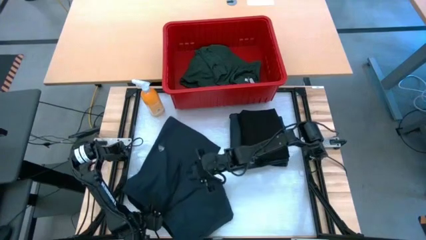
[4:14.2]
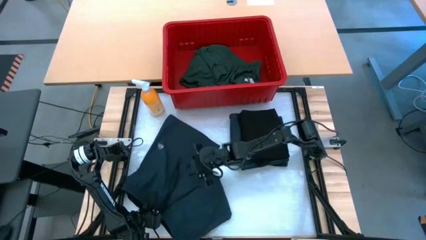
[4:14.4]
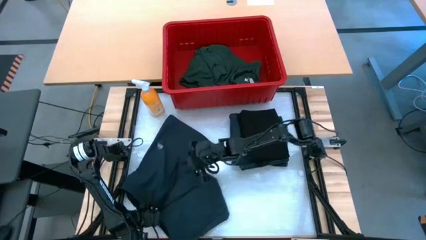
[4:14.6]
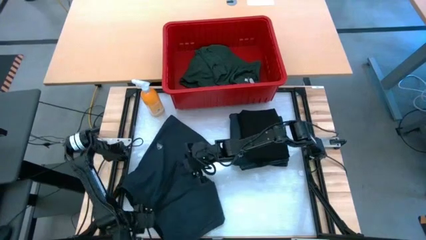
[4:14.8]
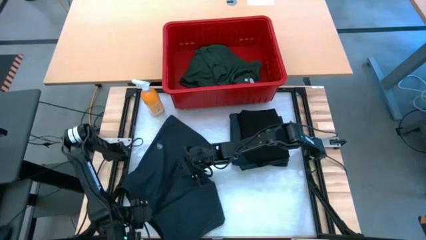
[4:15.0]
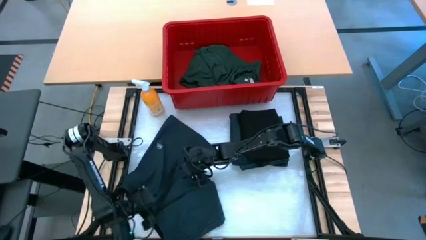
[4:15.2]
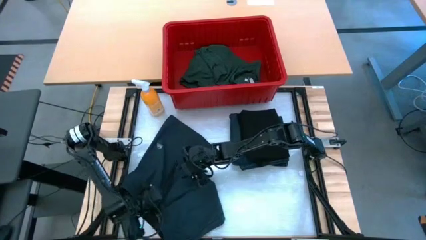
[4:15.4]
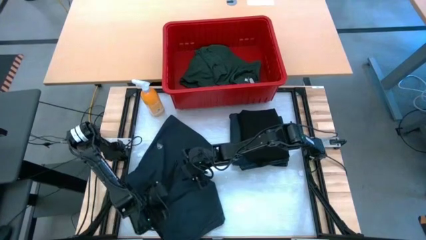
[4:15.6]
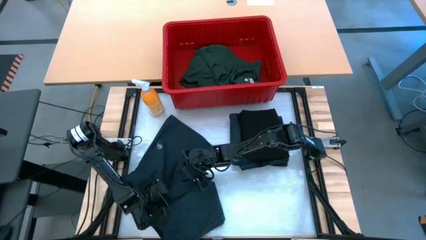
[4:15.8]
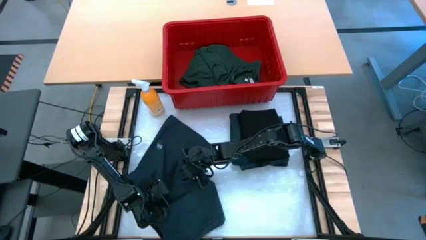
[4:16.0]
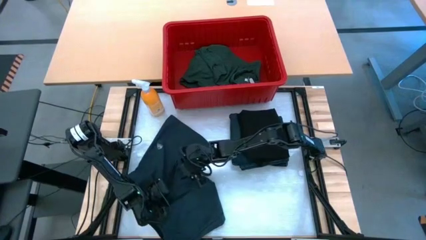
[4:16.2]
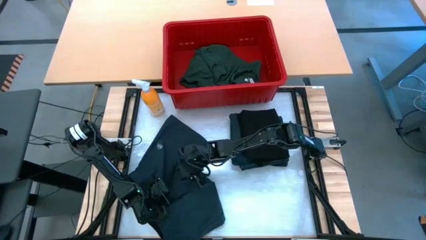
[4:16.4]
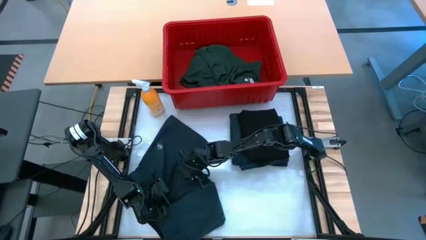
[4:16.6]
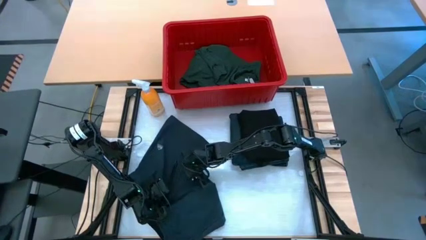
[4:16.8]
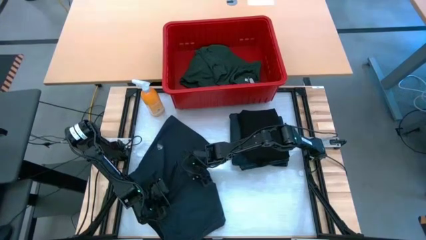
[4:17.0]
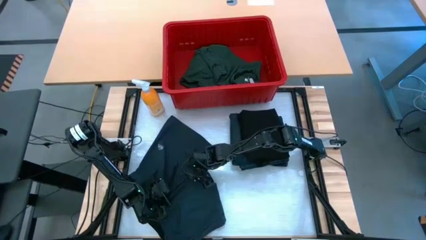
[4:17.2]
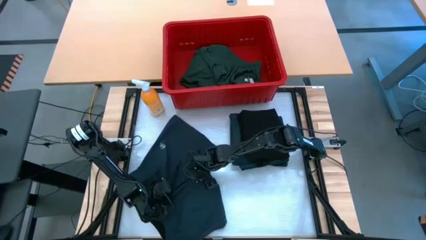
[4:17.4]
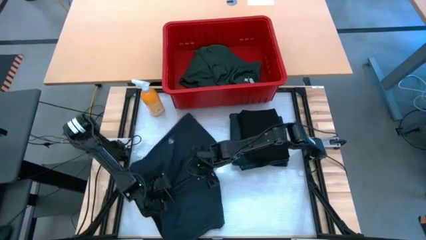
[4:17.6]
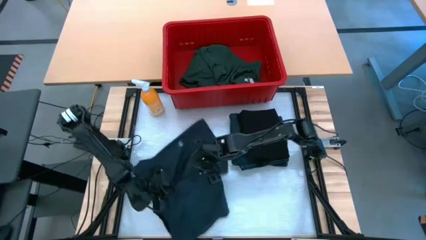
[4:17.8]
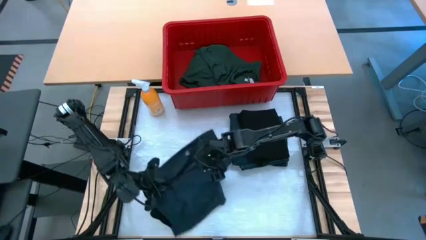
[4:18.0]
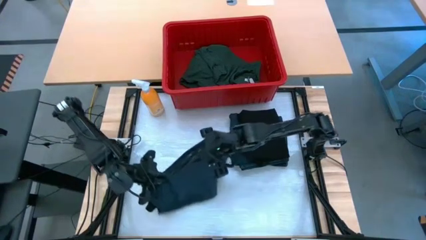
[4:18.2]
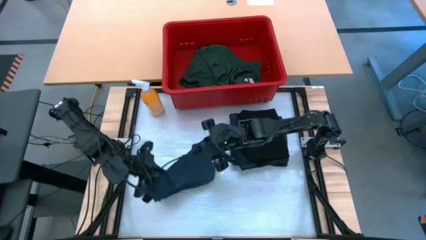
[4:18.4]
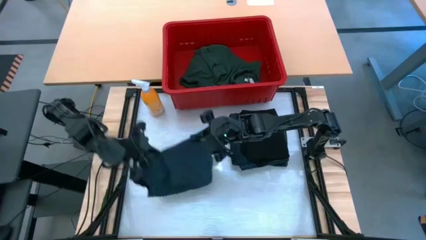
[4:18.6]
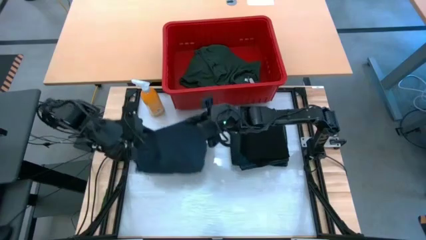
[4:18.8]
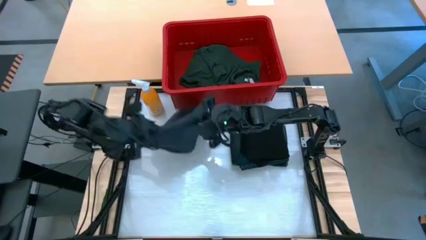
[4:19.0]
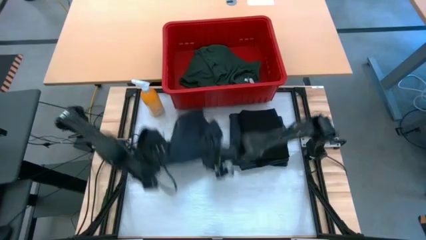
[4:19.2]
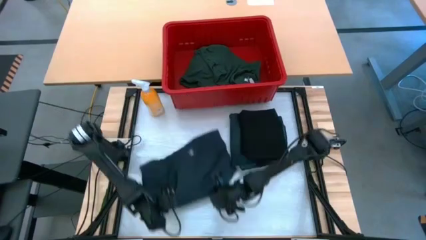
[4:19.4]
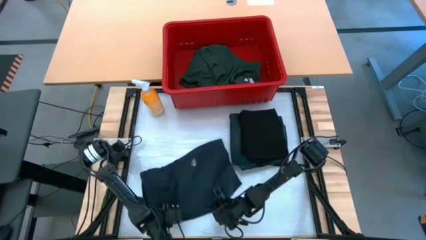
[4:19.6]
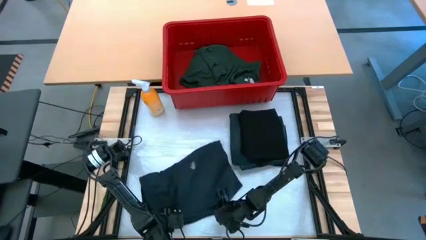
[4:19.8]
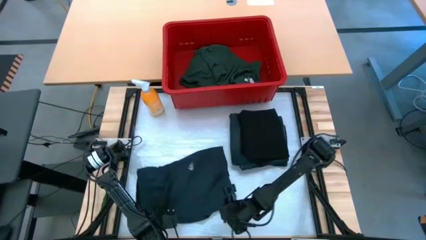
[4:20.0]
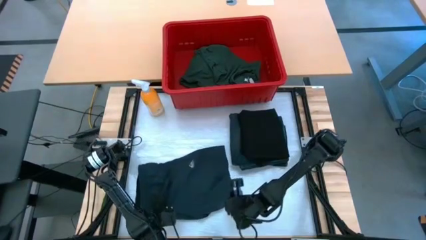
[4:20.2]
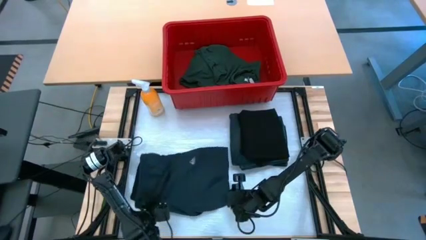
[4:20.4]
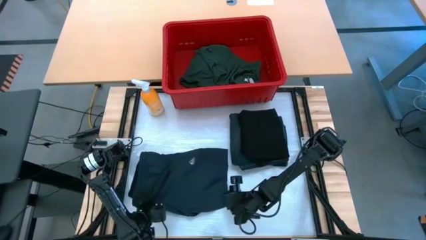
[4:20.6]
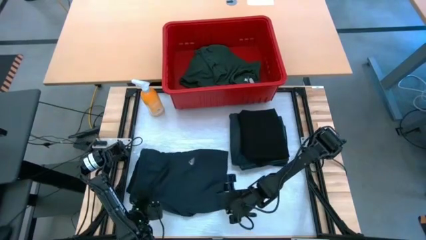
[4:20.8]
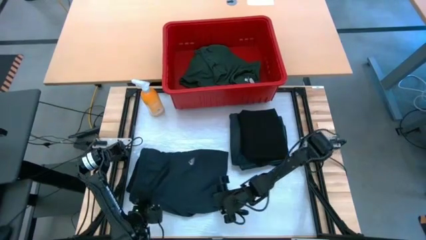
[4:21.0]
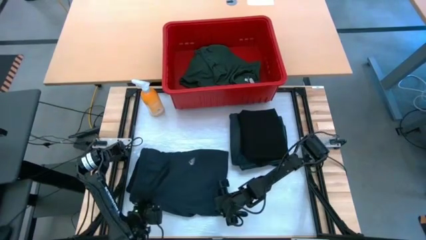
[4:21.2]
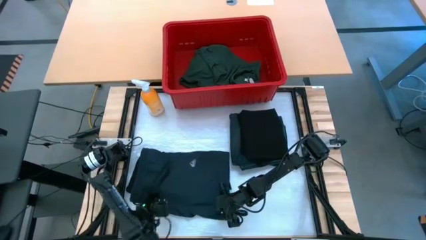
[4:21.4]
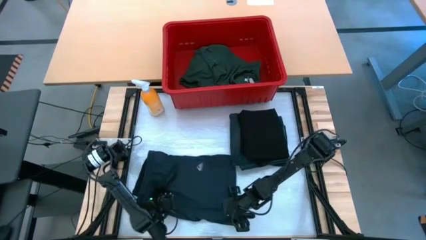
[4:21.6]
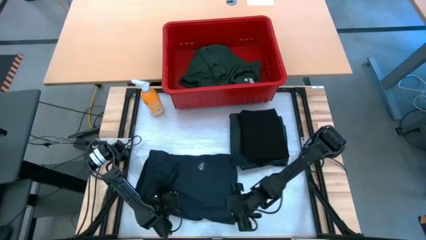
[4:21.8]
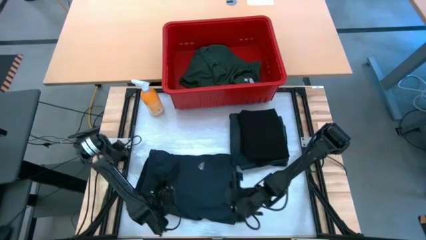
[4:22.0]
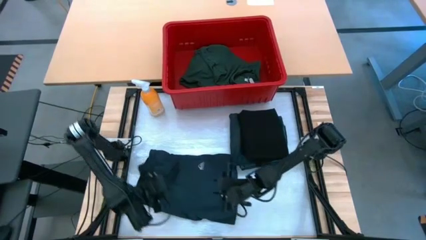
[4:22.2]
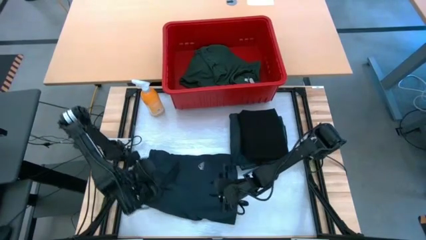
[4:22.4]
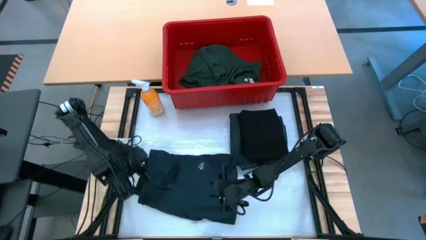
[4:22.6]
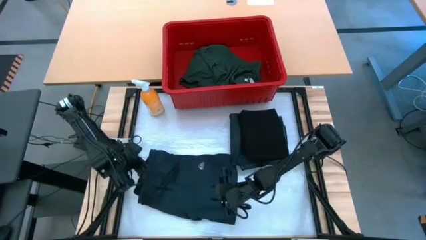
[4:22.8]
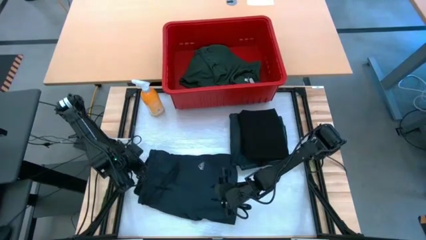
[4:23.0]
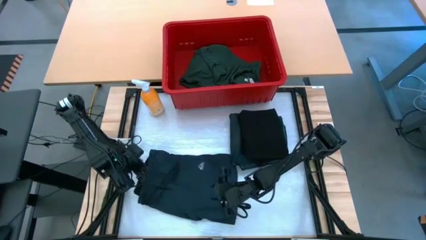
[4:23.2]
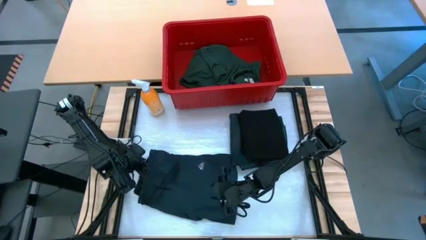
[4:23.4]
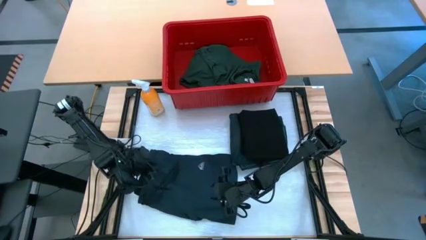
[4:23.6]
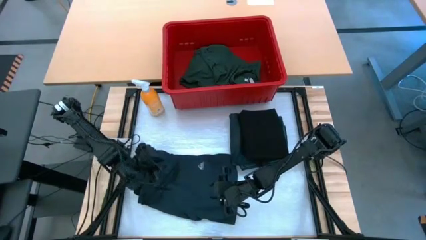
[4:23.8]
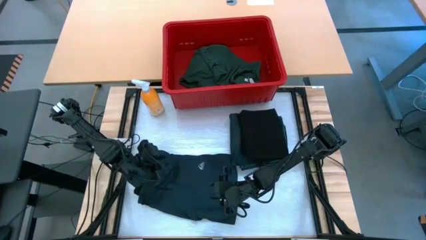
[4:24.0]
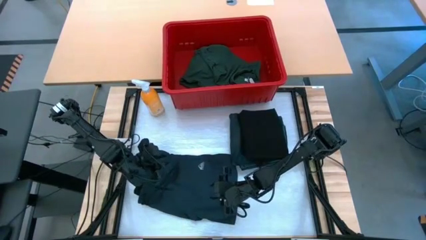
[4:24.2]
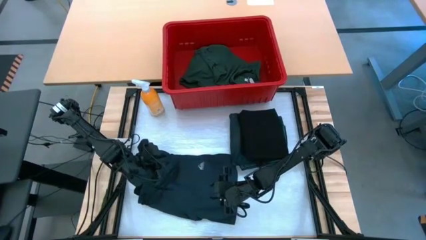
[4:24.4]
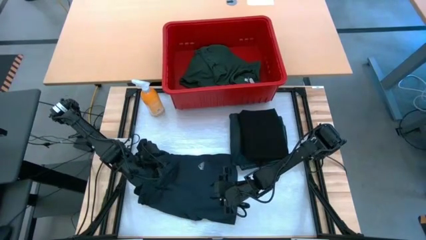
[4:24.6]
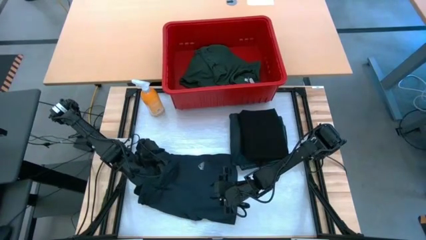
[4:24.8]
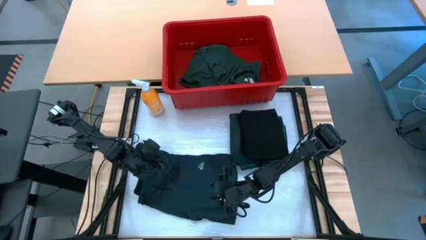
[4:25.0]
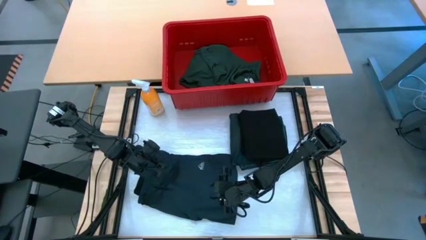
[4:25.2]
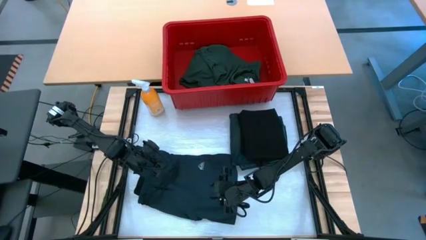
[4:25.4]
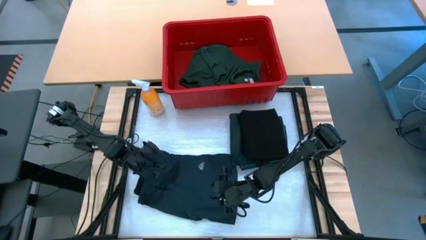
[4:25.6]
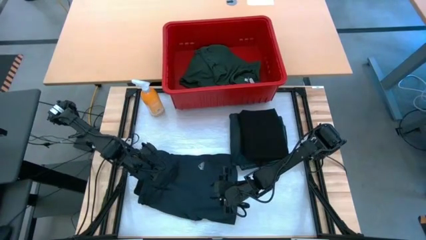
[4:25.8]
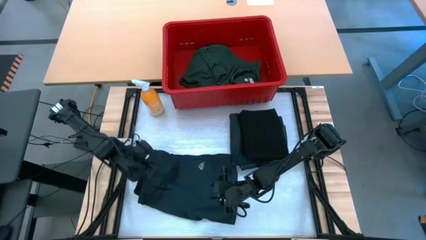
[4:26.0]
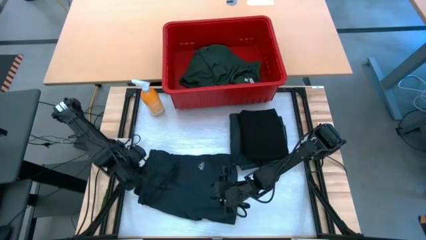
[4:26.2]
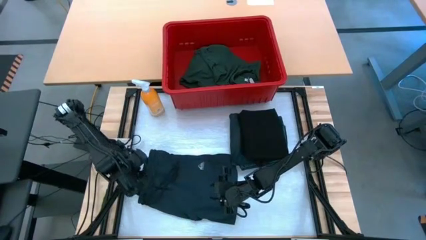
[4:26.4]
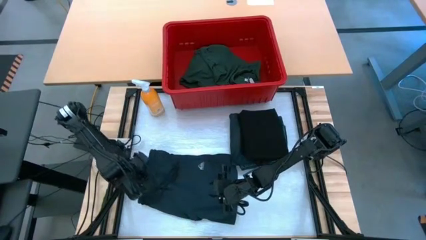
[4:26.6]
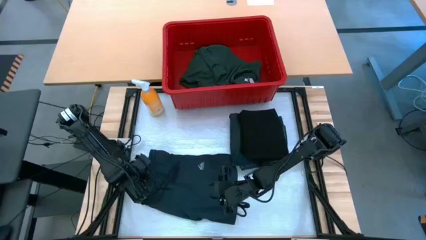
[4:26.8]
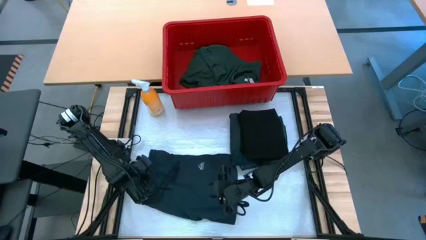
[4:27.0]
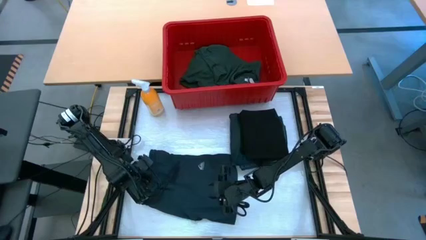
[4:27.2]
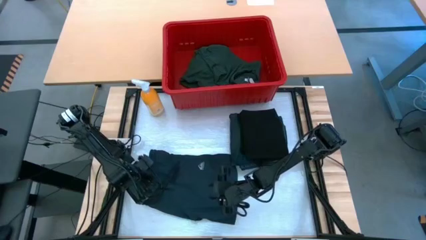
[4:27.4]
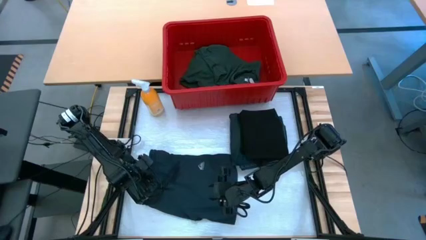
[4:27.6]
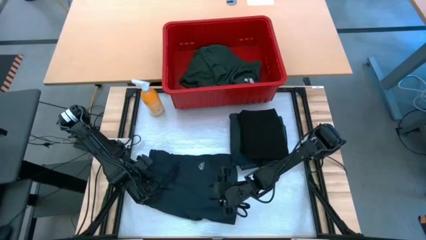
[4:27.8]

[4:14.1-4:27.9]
Task: Fold Laundry from Bin
Fold the black shorts
